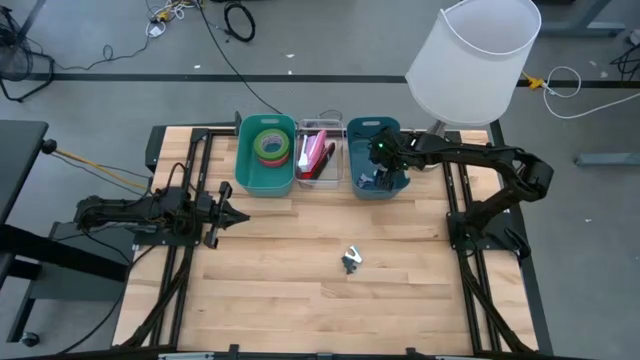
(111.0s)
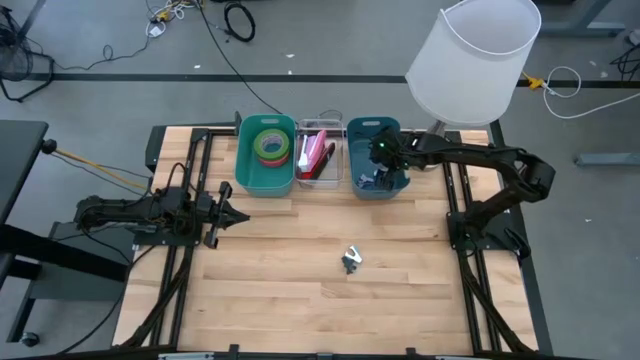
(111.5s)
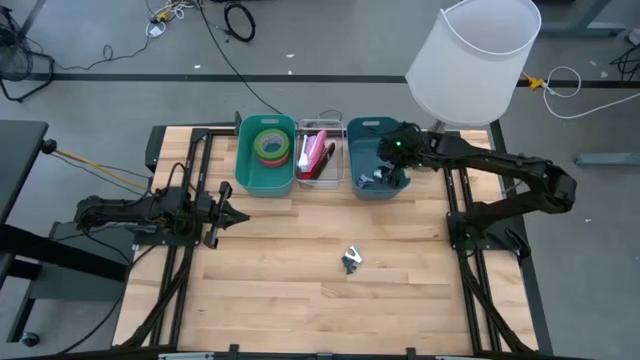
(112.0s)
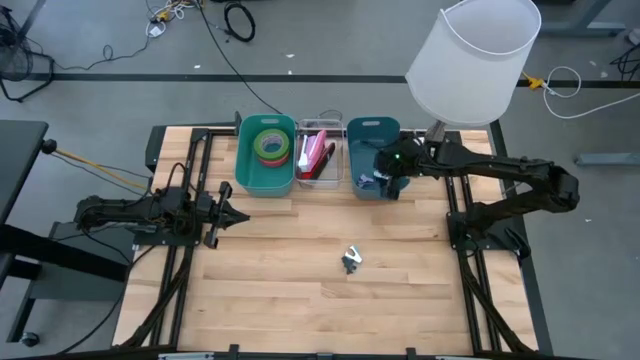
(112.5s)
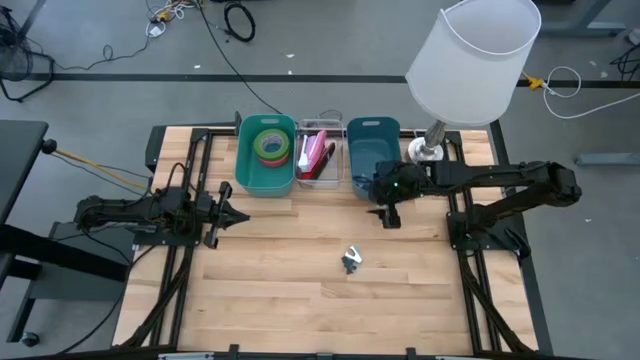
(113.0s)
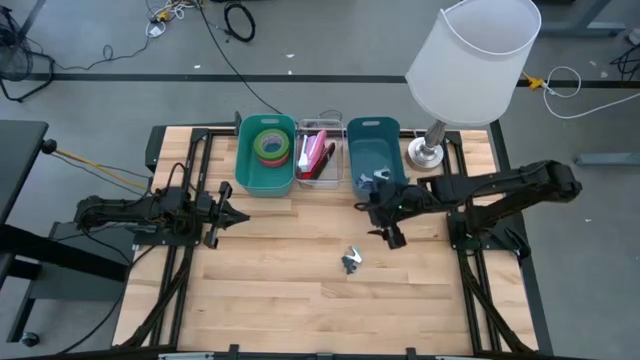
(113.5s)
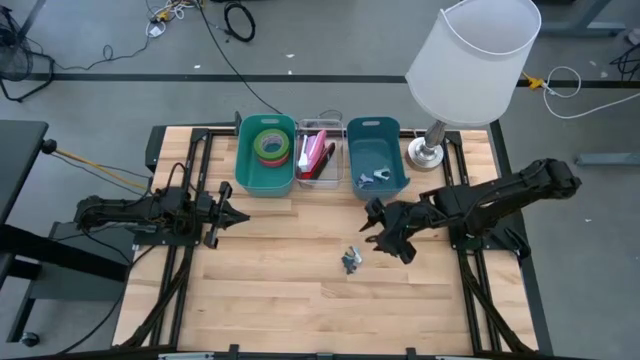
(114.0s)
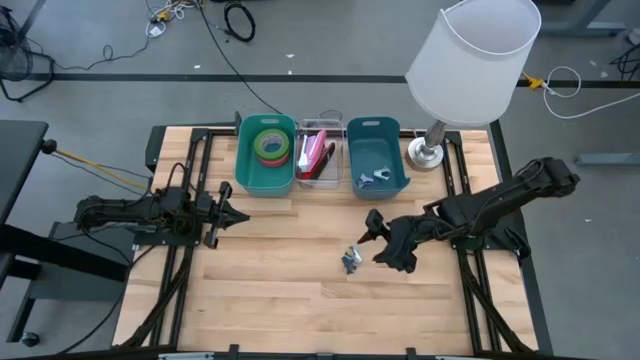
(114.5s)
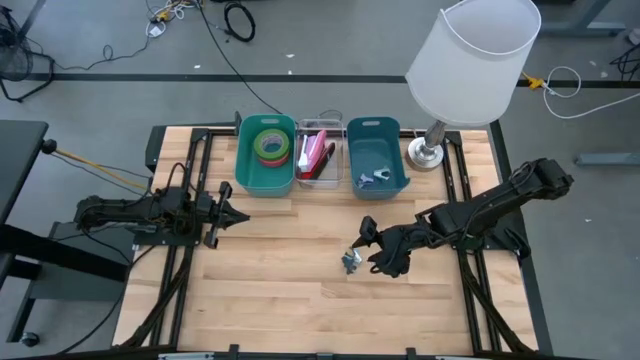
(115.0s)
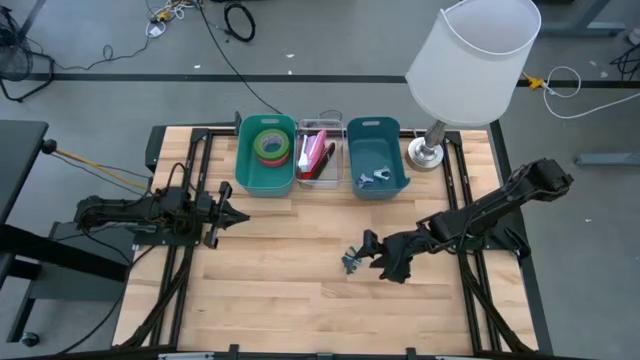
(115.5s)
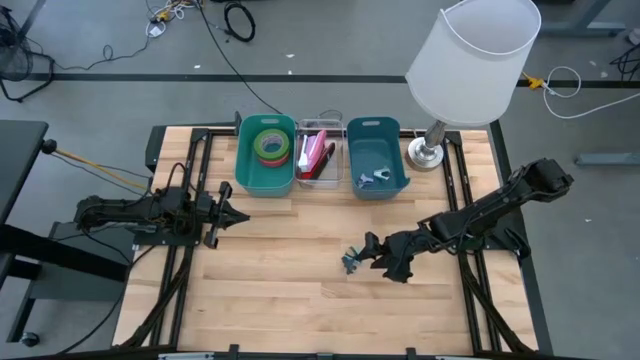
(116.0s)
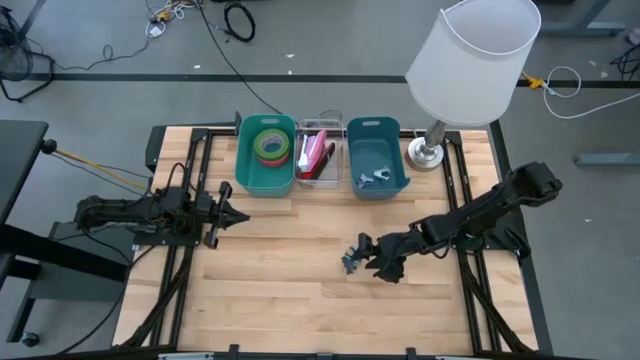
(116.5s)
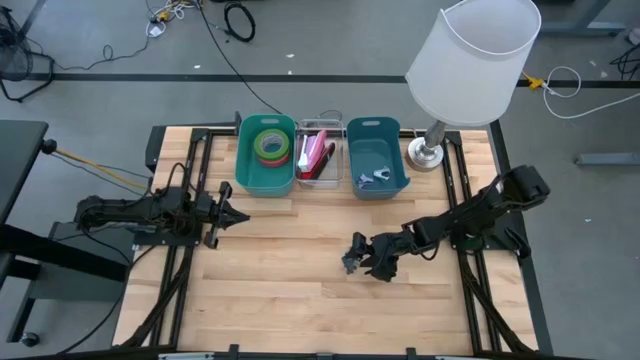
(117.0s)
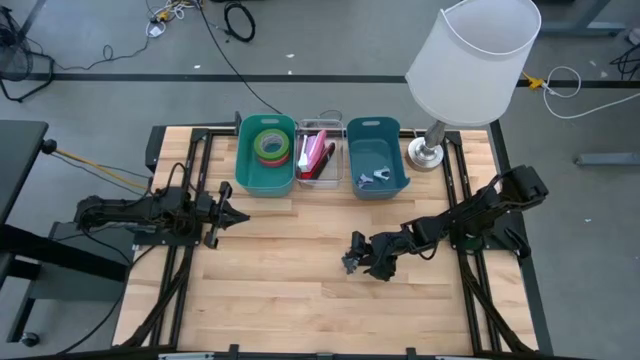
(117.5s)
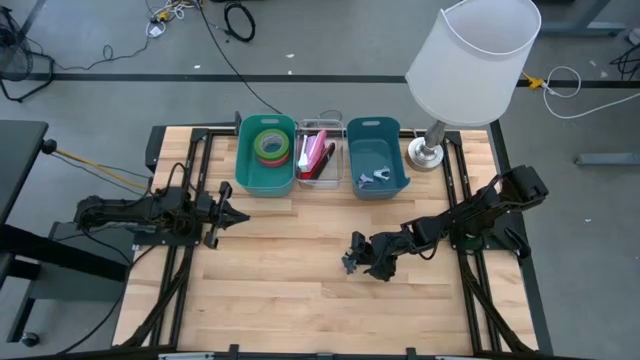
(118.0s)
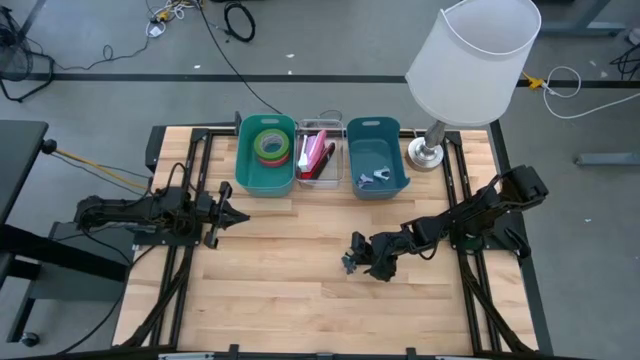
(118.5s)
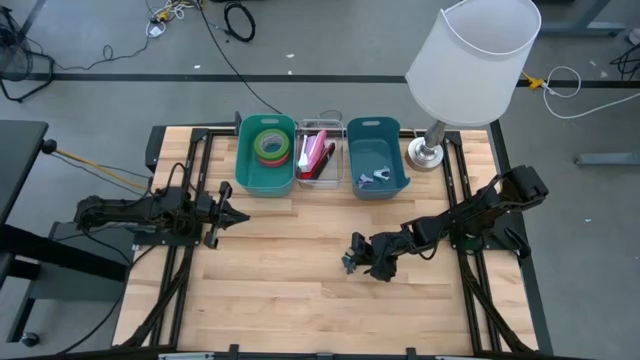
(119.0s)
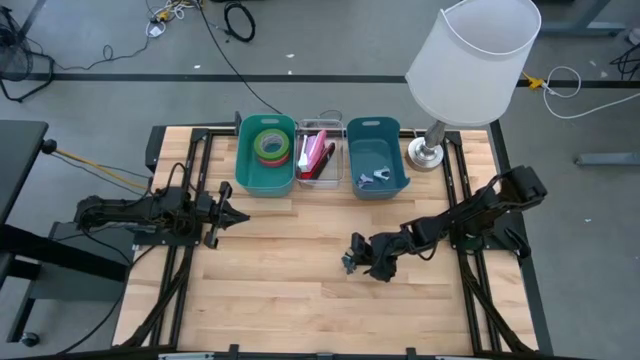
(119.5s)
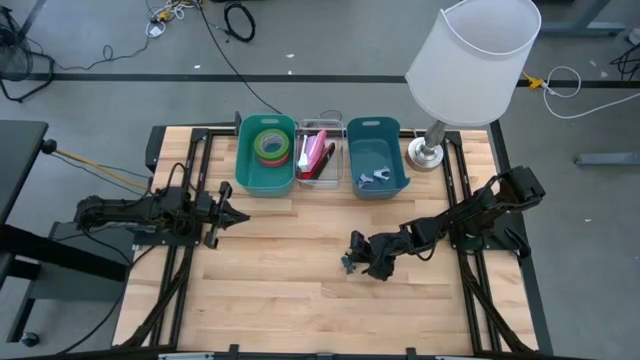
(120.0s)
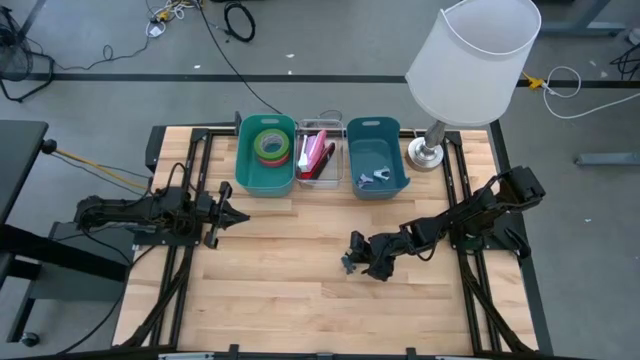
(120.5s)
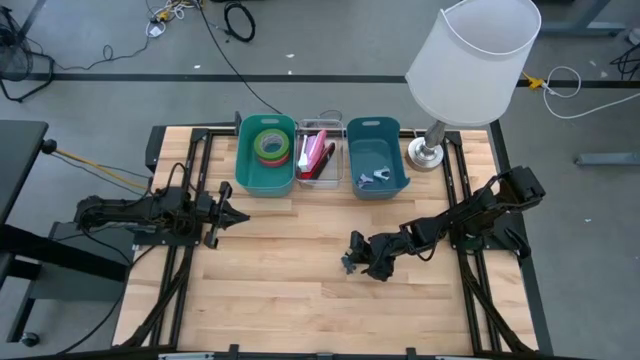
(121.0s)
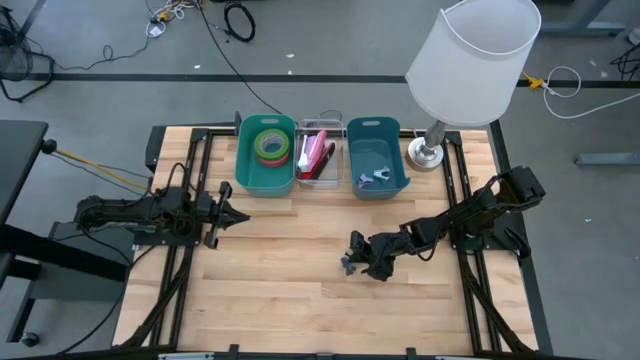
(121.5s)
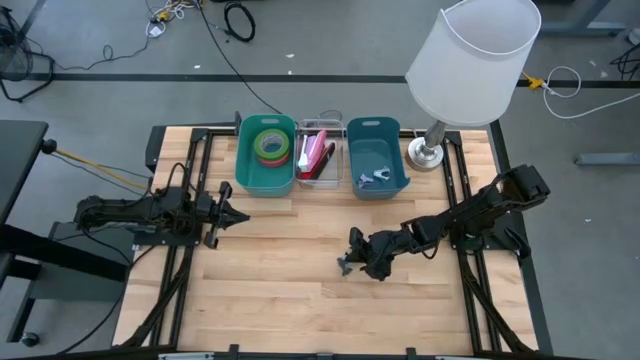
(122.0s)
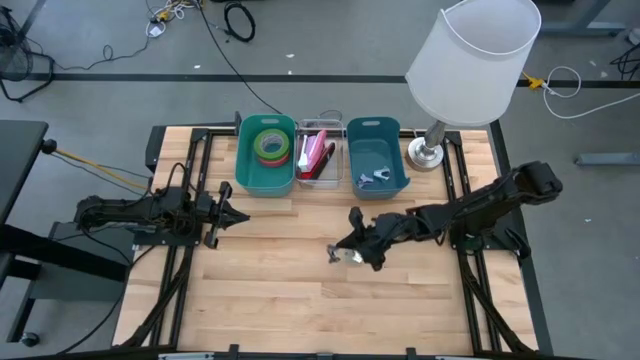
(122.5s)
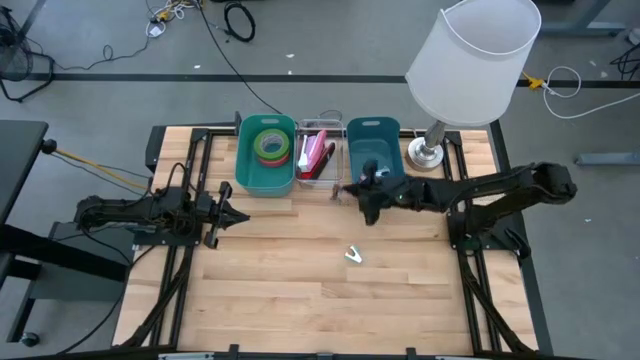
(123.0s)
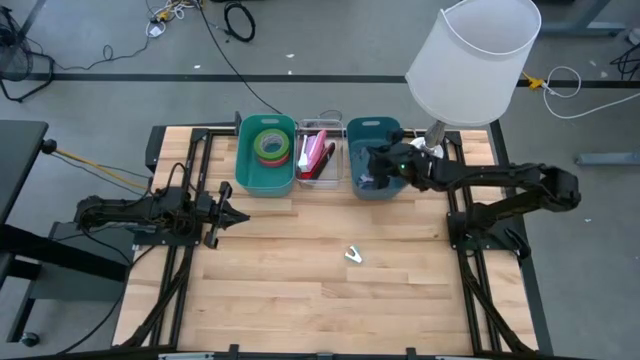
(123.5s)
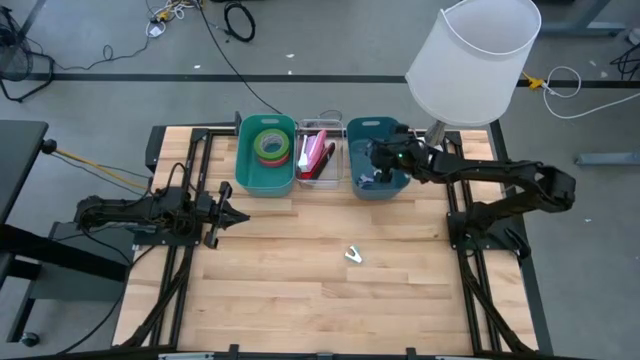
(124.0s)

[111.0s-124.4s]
Task: Pick and place Stapler, Stapler remover, tape
Put the gray staple remover into the blue bin

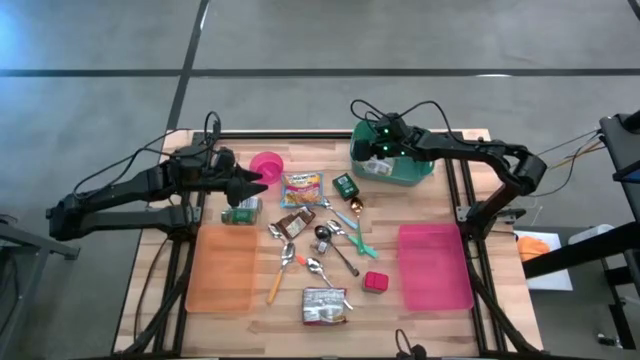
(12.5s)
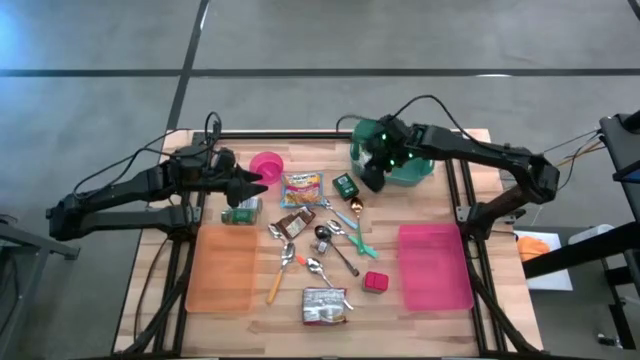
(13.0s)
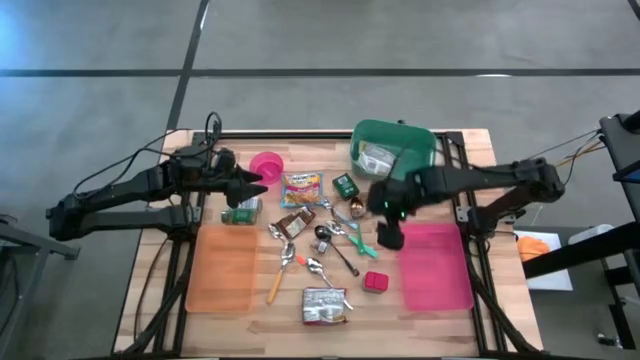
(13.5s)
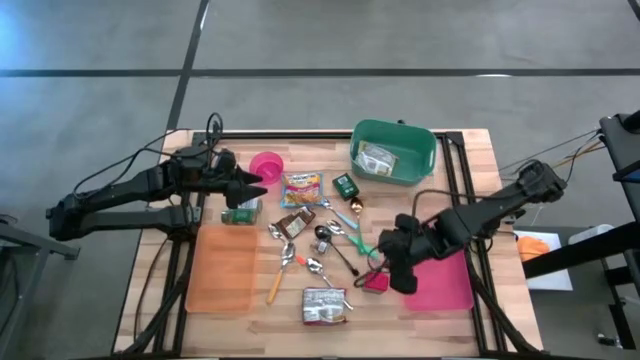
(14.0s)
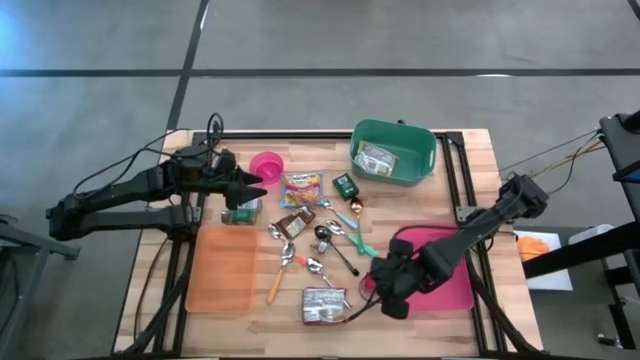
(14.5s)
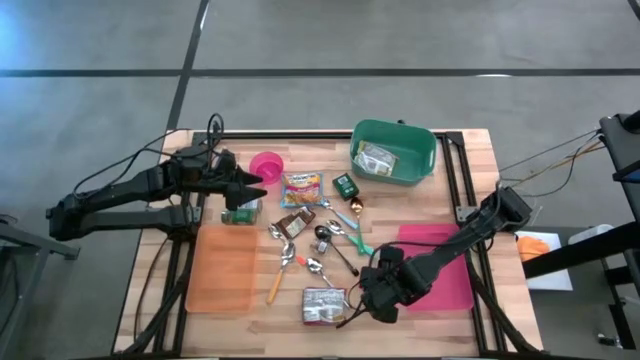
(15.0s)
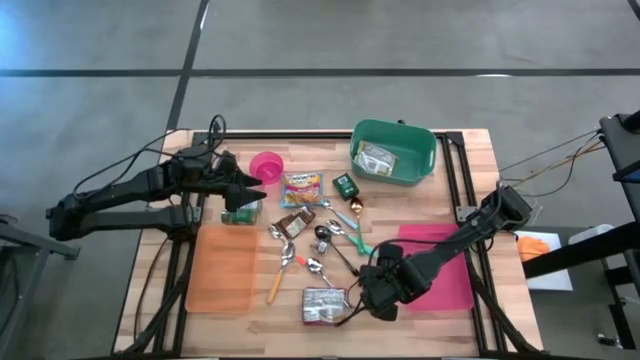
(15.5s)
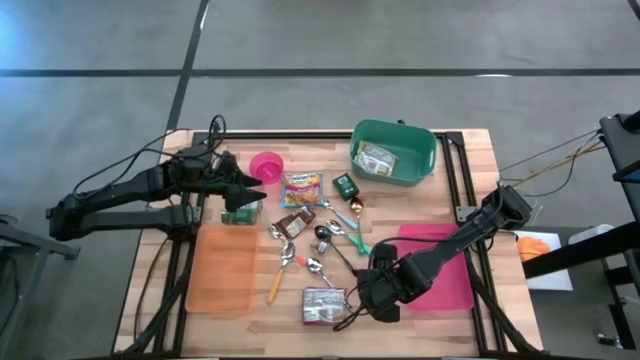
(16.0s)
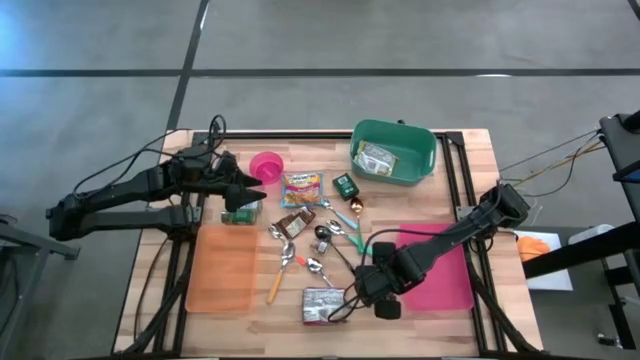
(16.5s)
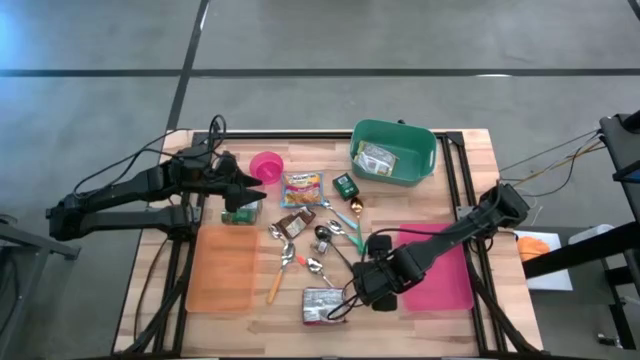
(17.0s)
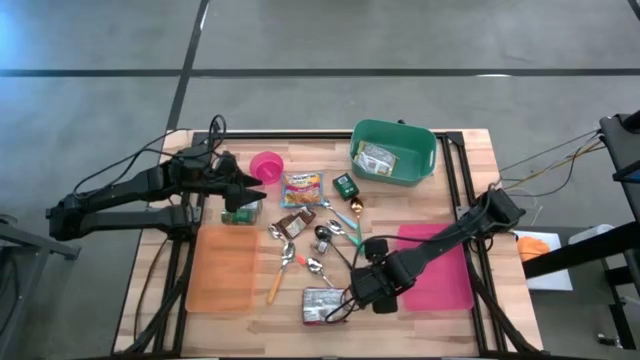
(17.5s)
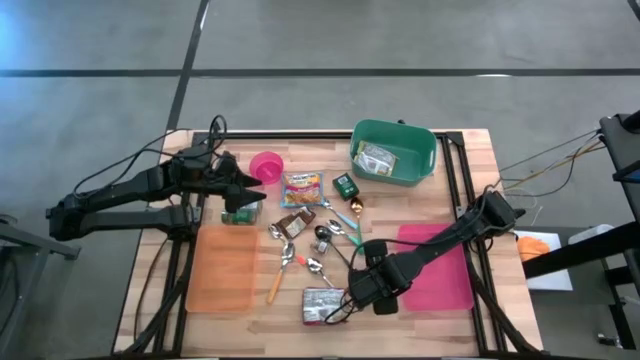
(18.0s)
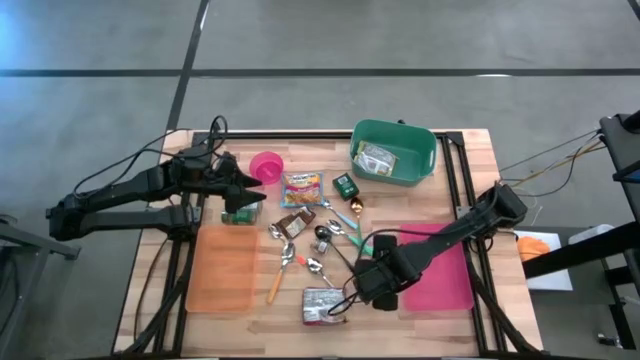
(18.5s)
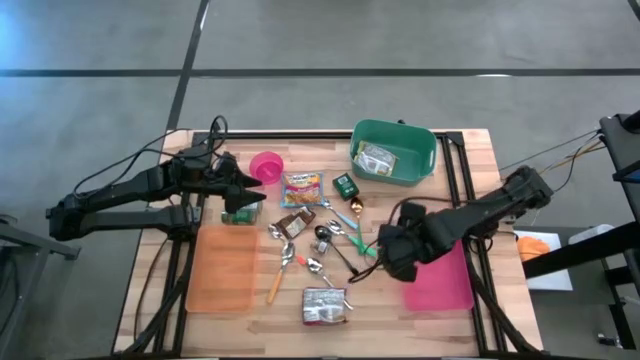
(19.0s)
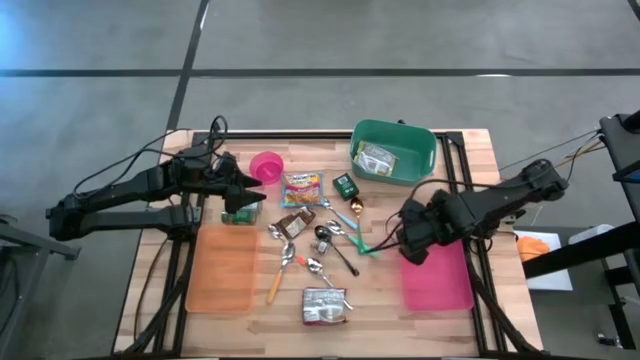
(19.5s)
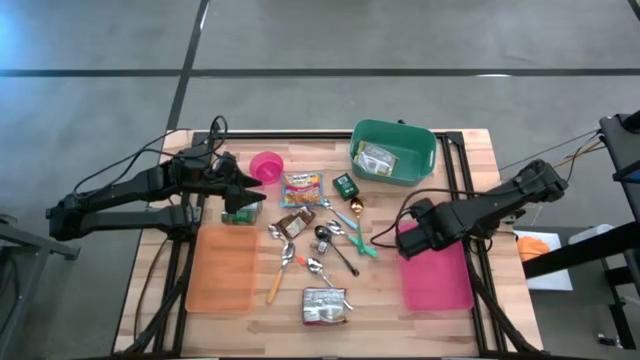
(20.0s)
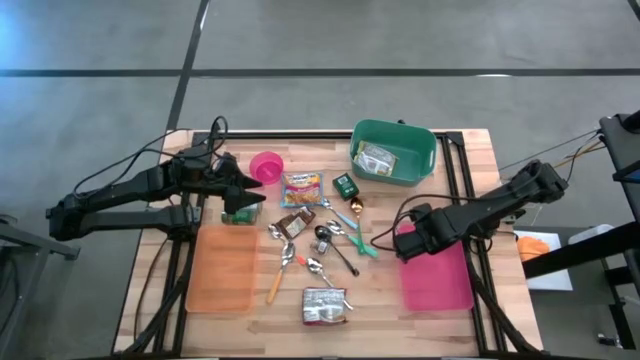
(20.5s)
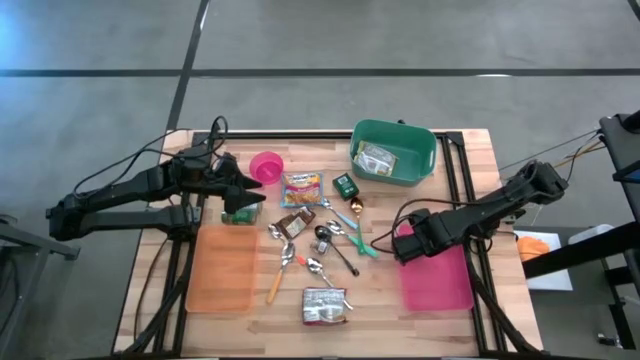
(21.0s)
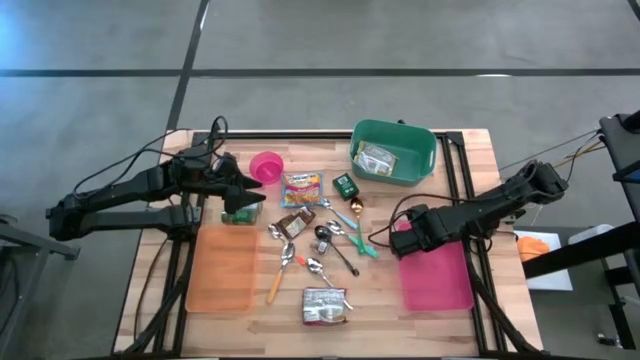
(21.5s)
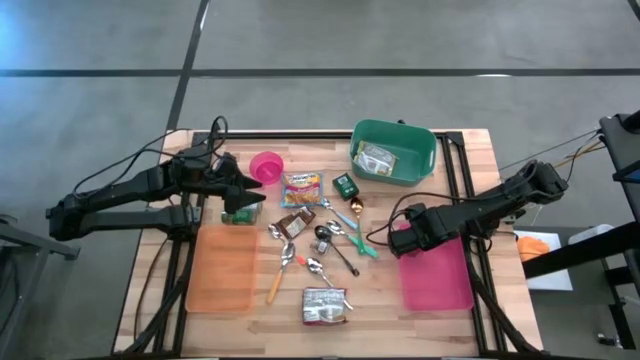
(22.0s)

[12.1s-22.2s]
Task: Pick & Place Food Item
Put the red seasoning can into the pink bin
